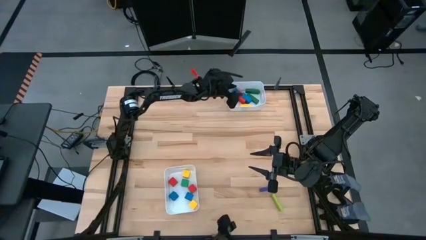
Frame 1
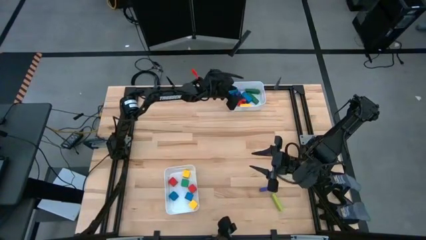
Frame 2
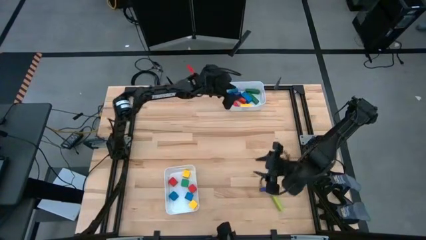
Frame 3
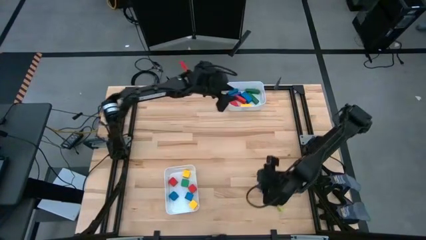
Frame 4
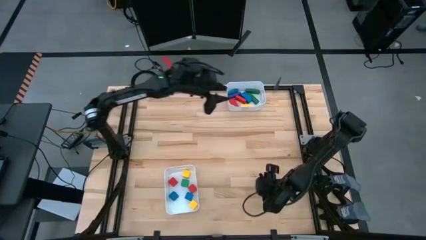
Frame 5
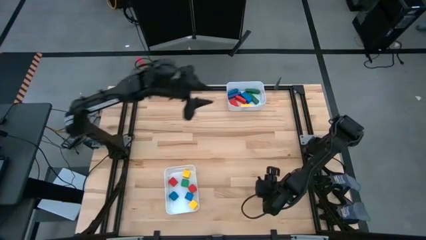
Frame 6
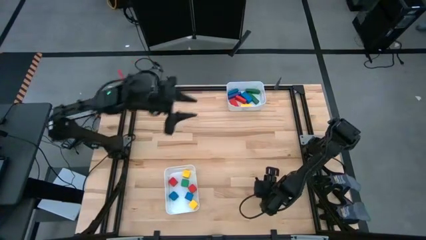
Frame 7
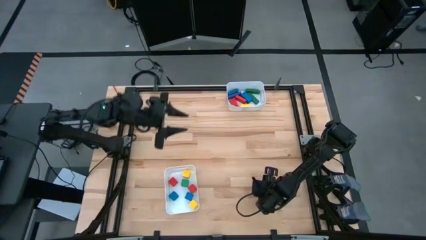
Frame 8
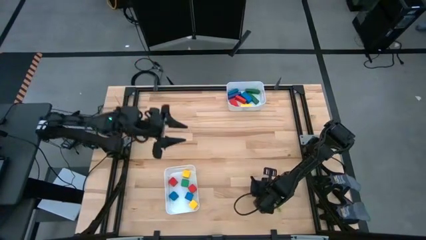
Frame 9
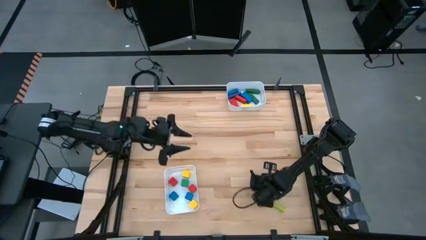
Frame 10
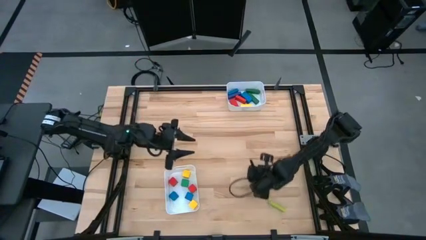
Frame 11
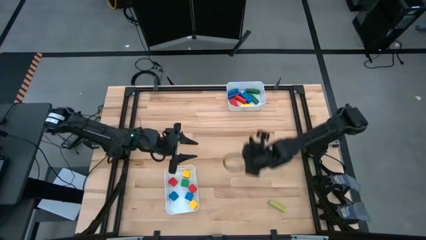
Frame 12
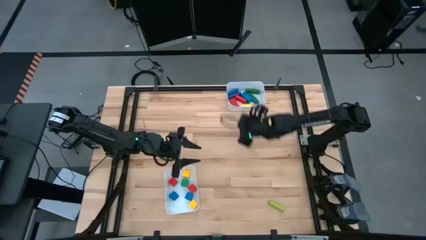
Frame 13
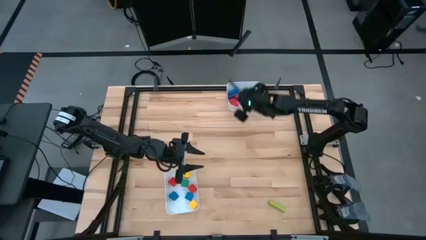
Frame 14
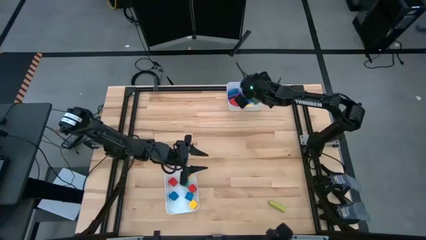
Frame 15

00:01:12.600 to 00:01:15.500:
Task: Sort blocks by size
Put the violet large block into the top white bin

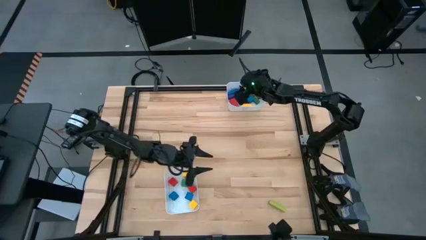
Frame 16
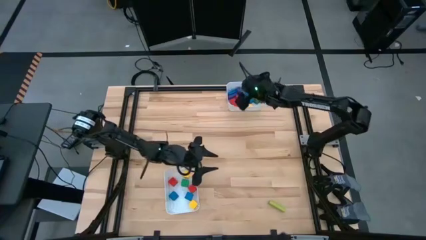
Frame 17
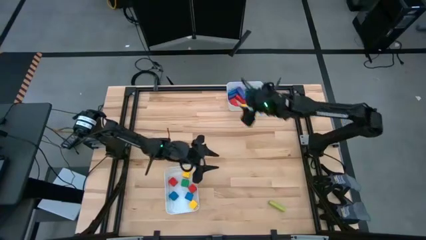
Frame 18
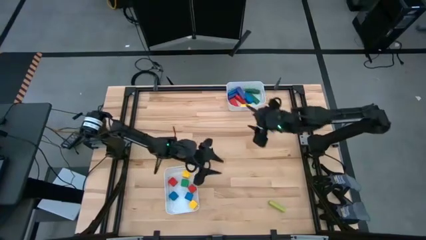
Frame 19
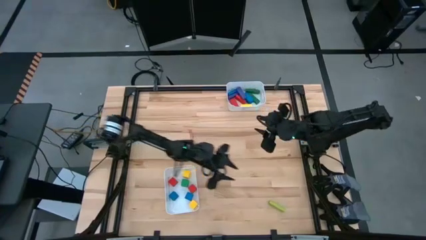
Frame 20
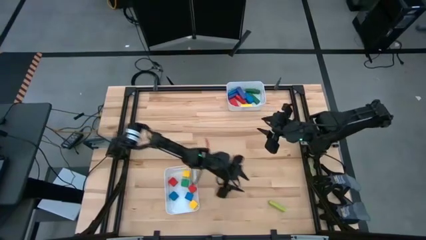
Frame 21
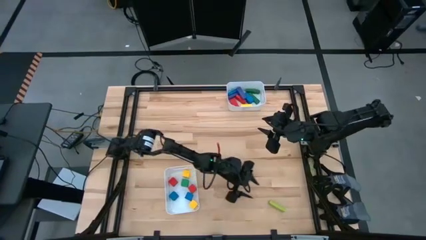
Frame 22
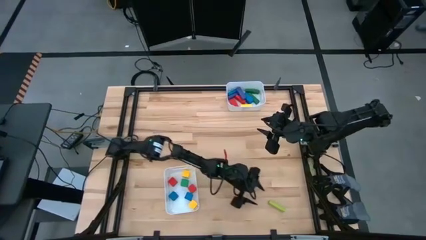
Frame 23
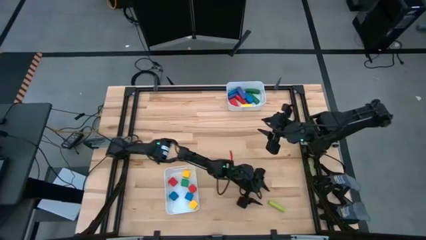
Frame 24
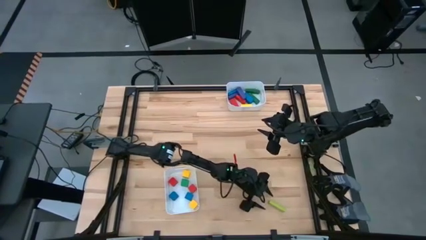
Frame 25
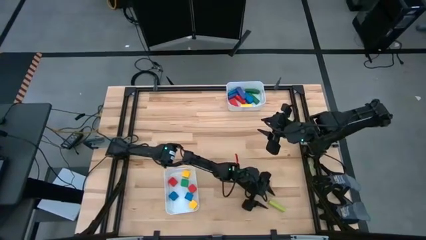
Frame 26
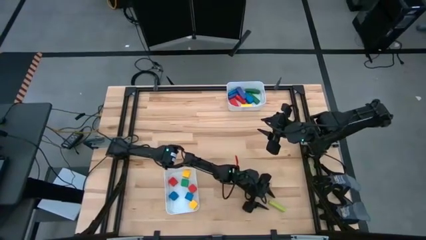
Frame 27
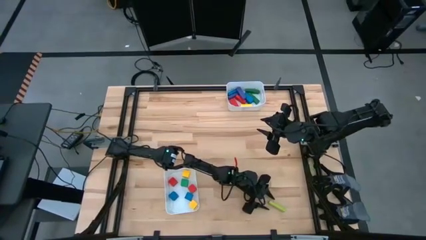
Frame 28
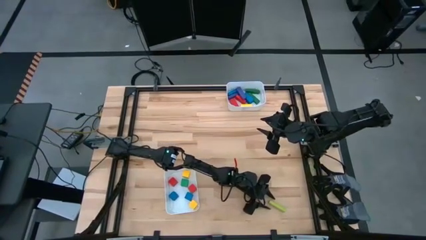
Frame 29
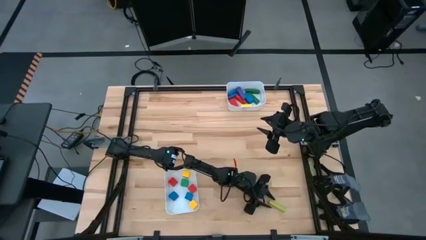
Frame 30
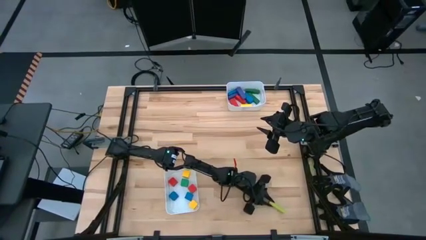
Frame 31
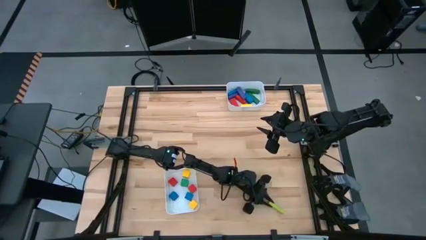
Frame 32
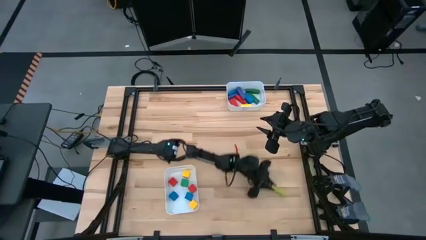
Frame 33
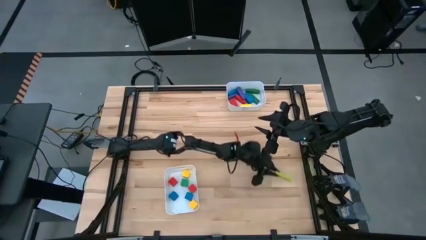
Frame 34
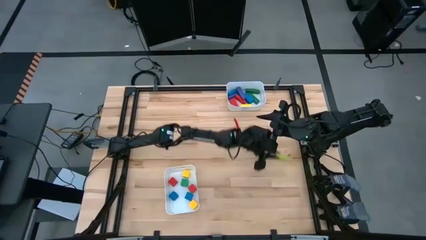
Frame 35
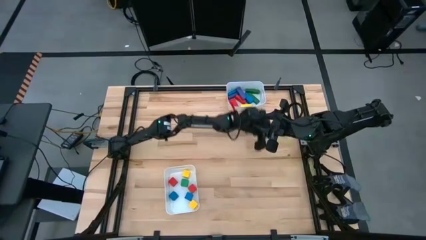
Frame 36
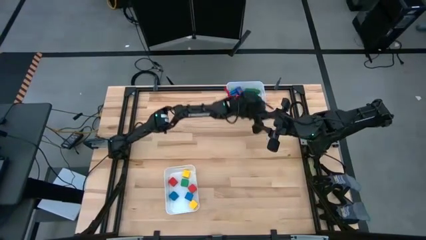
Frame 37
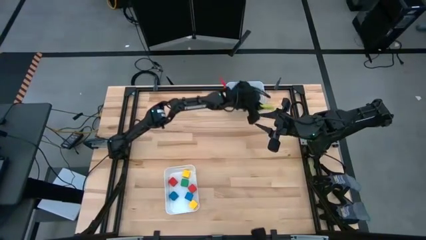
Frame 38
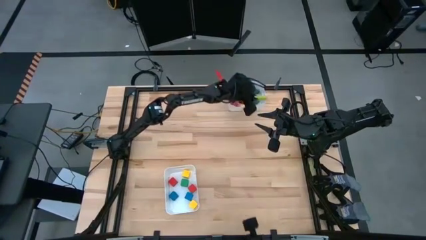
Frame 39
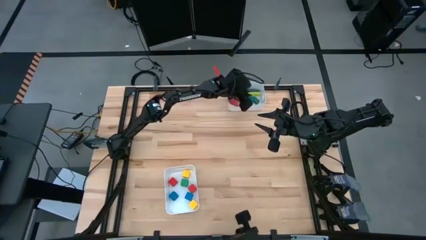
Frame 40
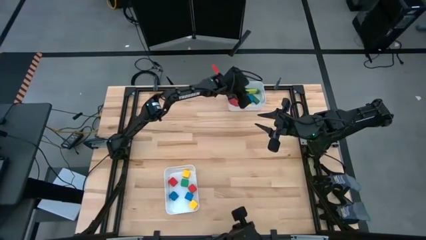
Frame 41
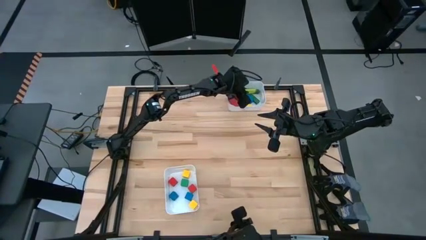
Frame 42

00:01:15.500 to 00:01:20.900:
Put the green large block into the top white bin

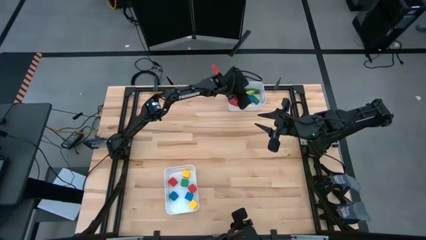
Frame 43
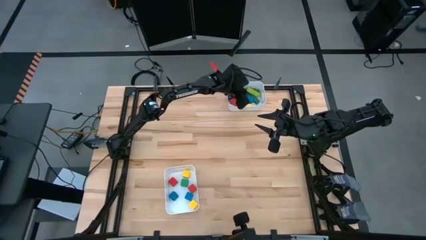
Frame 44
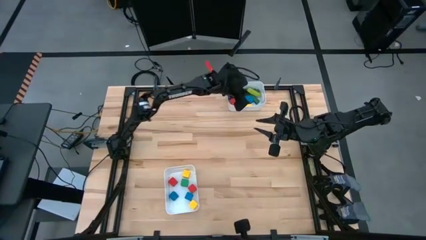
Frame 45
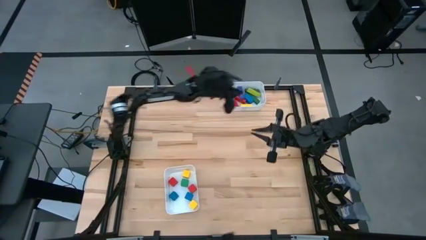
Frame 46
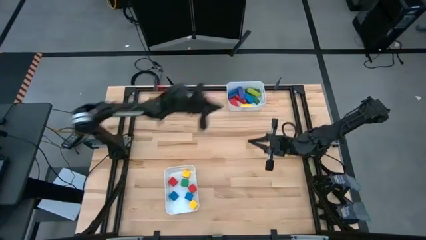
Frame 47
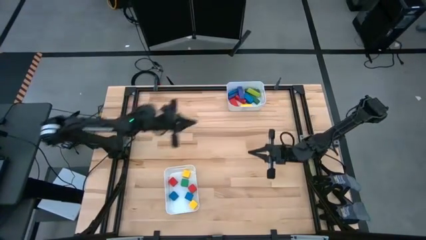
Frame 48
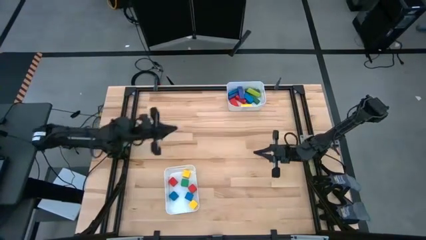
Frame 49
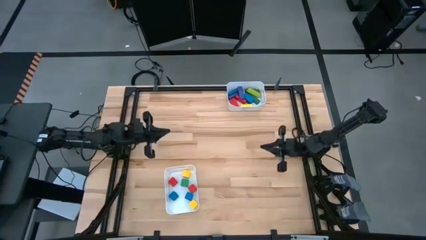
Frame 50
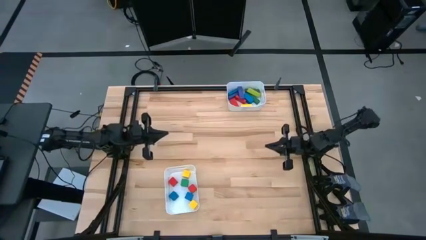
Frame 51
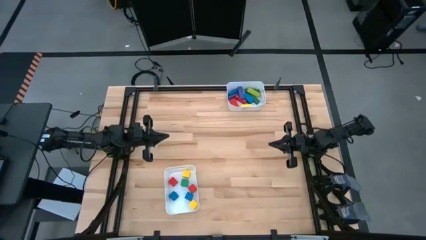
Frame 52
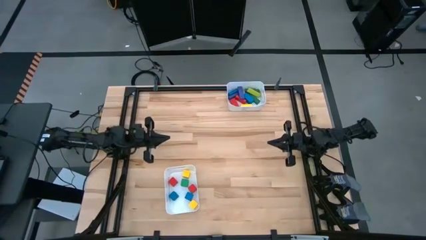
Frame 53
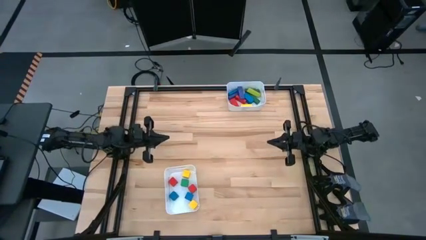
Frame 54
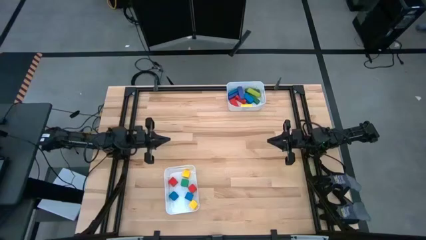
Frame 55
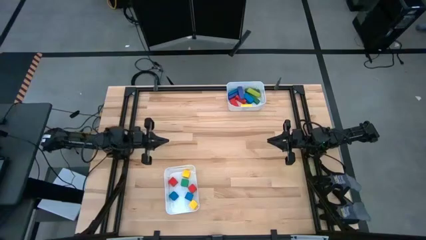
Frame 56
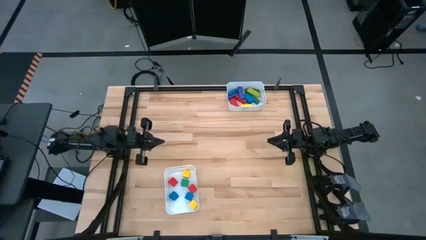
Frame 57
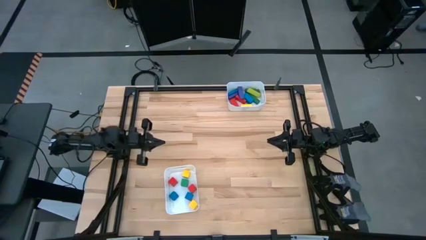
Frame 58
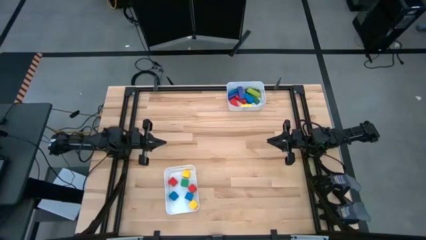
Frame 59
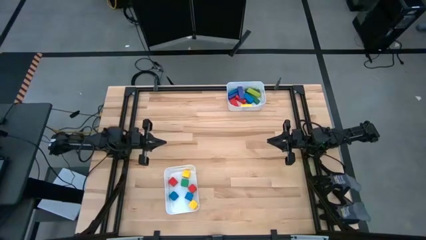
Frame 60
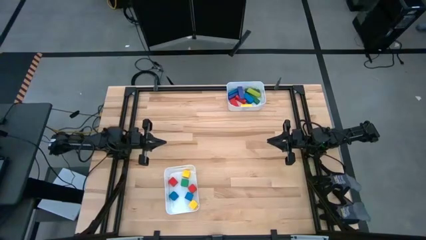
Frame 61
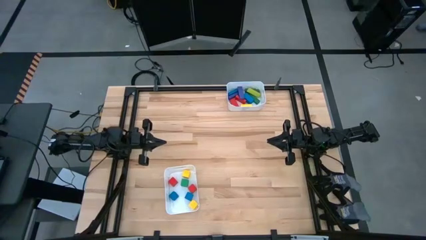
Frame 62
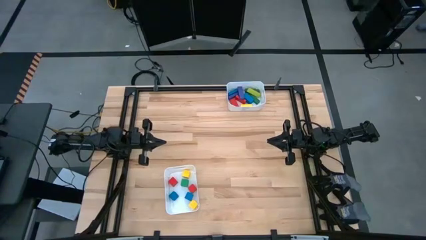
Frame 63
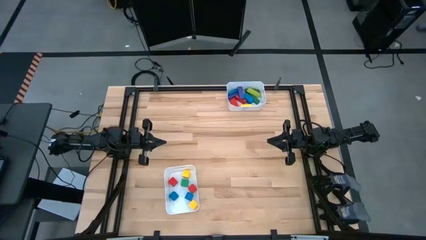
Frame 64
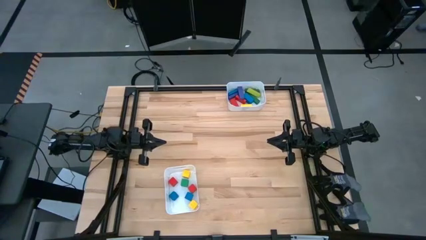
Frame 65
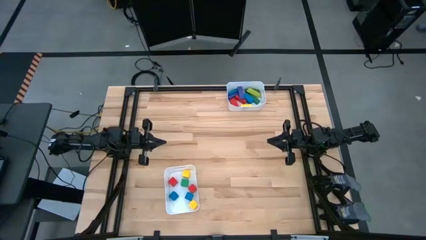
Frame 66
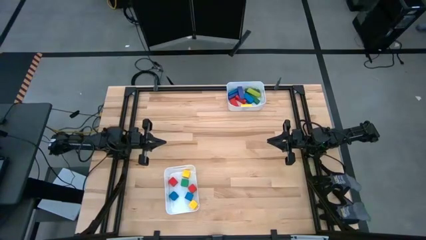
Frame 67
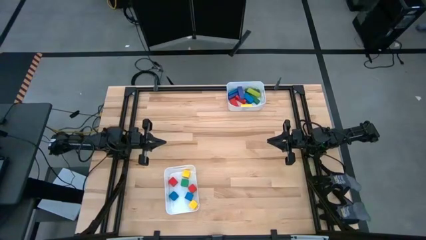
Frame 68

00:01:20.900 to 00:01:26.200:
Return to Home Position

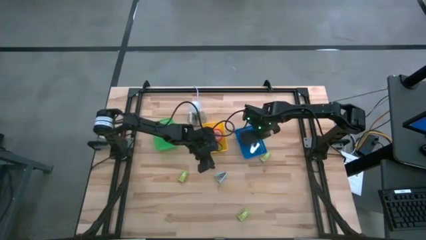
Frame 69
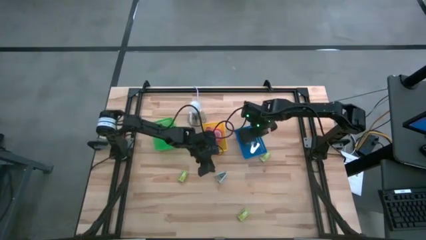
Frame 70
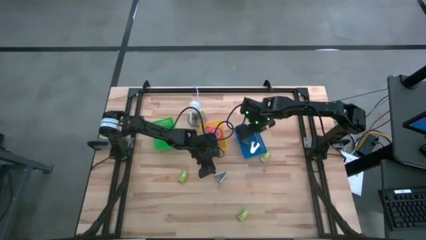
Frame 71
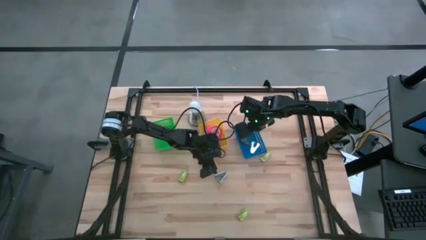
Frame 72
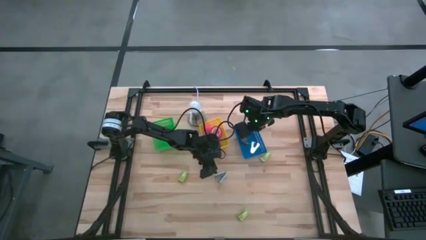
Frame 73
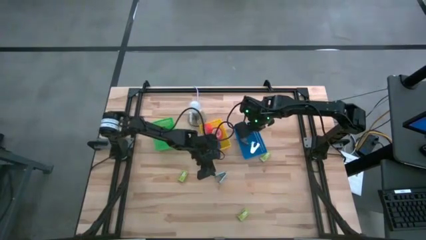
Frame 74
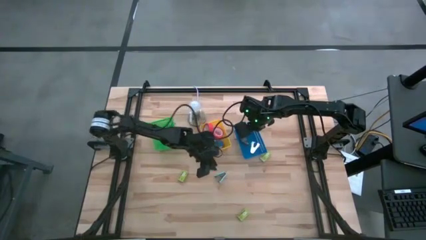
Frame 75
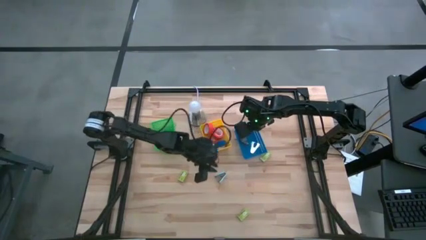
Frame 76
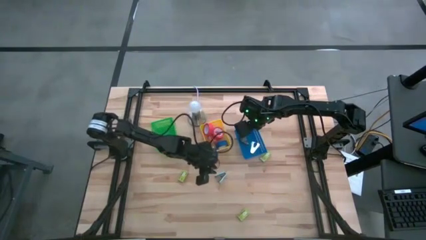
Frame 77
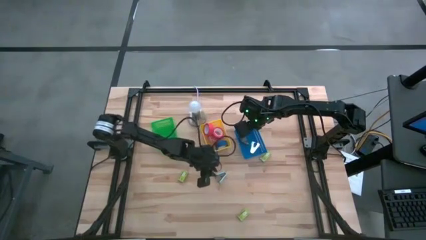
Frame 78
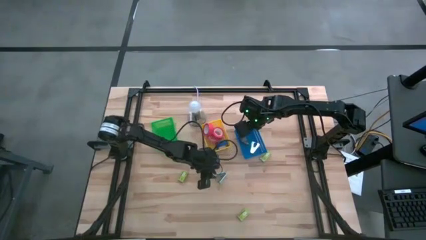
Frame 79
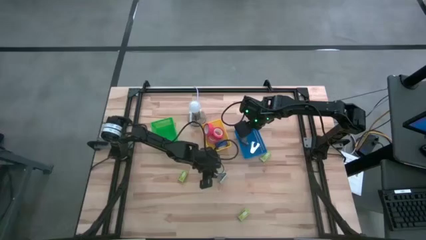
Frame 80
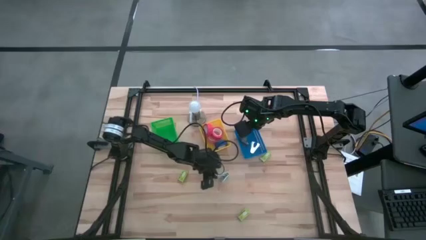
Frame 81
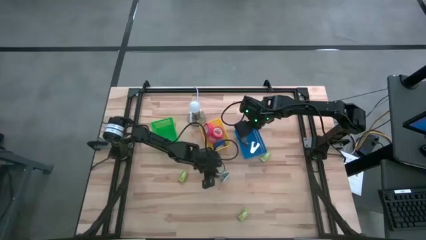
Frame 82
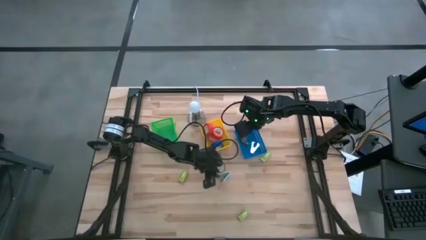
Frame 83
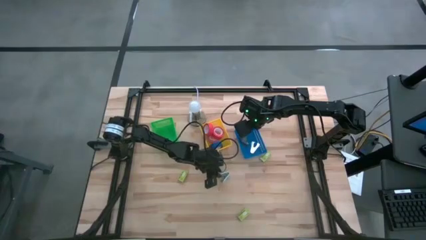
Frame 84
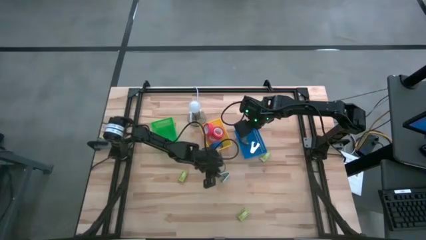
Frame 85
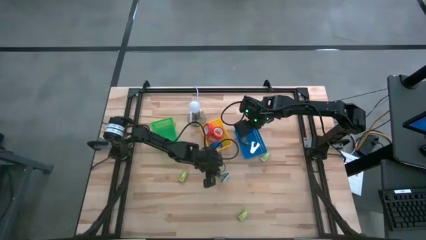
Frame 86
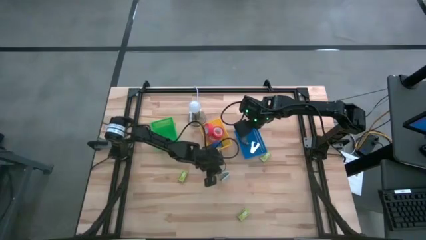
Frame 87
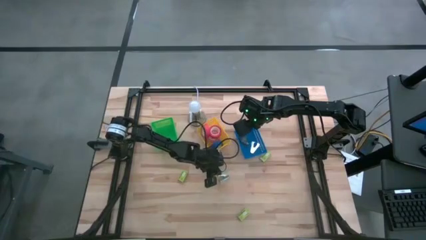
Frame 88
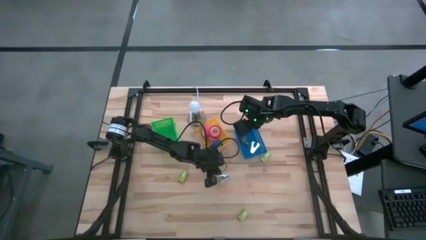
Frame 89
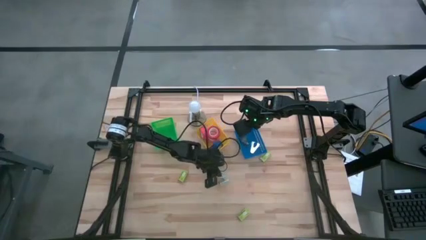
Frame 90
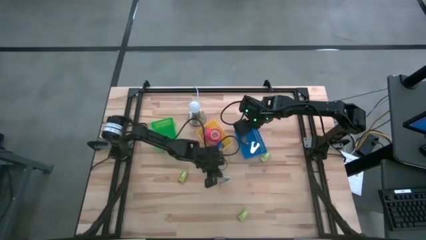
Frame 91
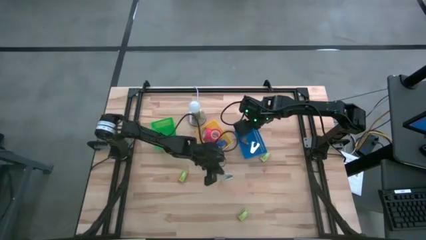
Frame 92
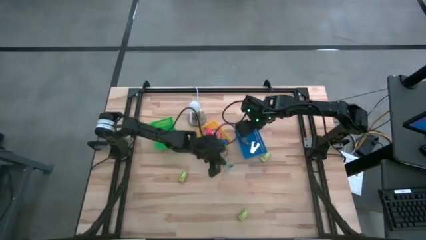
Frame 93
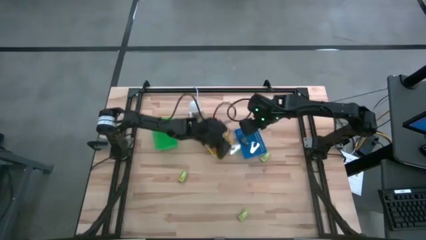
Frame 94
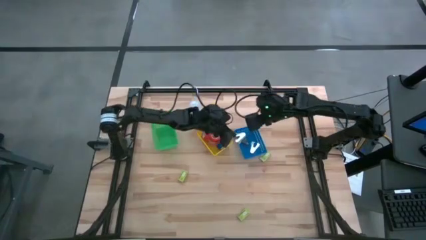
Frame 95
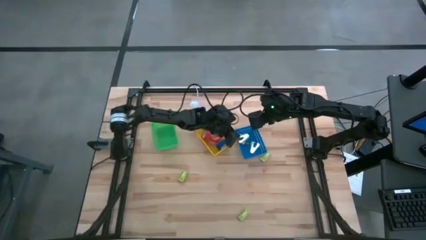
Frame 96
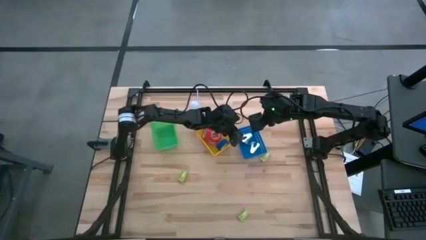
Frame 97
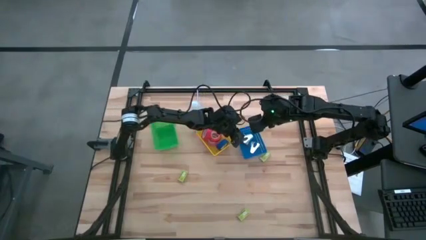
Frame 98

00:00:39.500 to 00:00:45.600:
Task: Pick and place Stapler, Stapler remover, tape
Put the light blue staple remover into the blue basket
